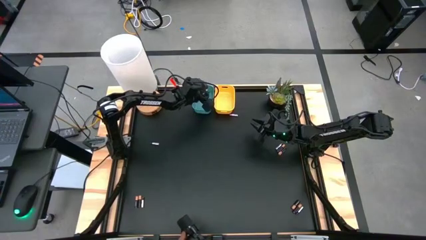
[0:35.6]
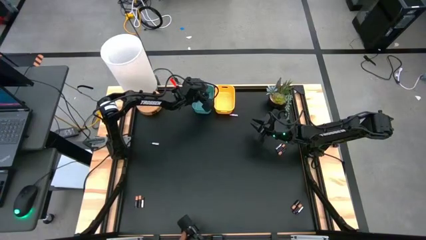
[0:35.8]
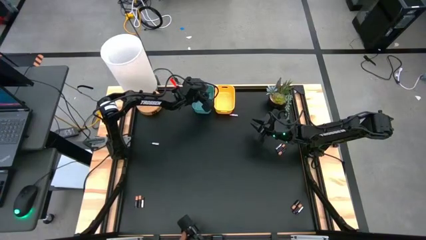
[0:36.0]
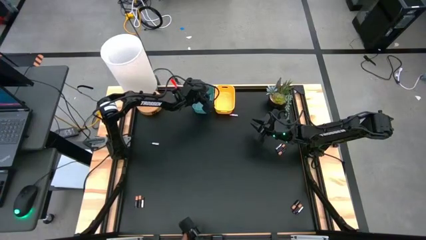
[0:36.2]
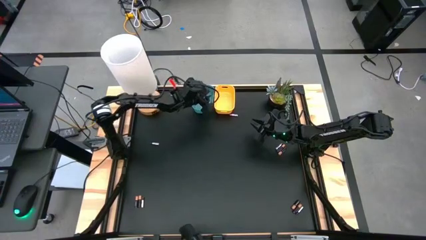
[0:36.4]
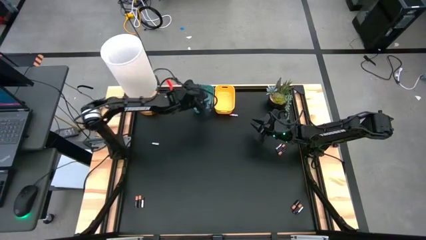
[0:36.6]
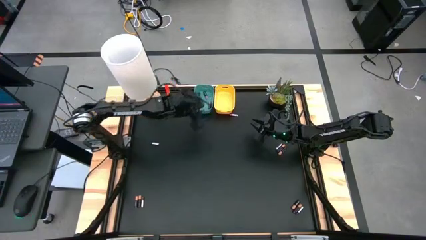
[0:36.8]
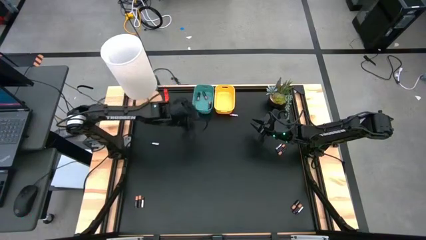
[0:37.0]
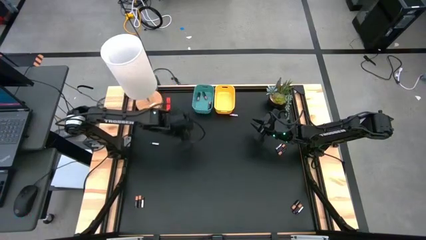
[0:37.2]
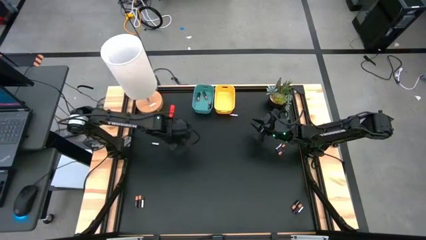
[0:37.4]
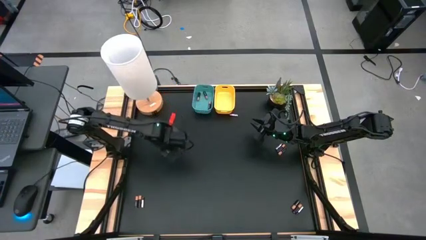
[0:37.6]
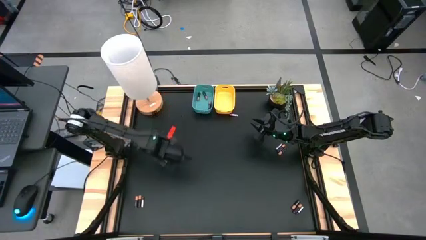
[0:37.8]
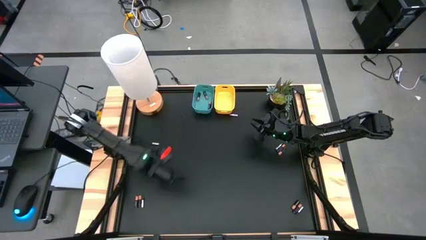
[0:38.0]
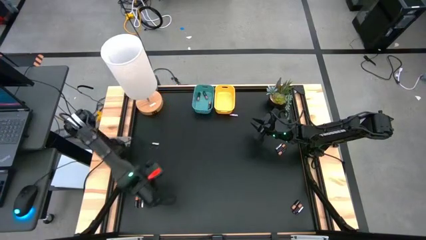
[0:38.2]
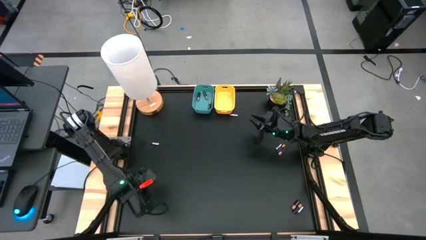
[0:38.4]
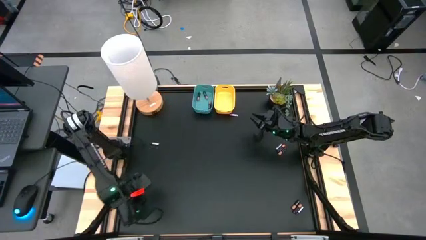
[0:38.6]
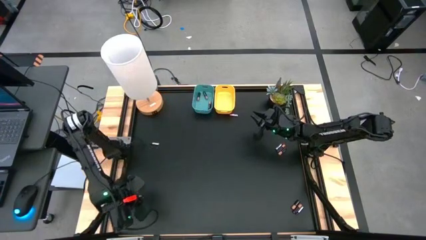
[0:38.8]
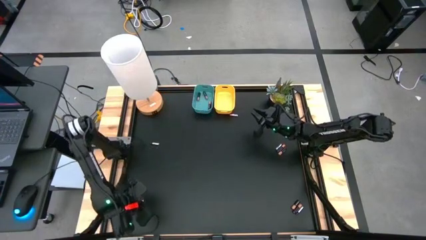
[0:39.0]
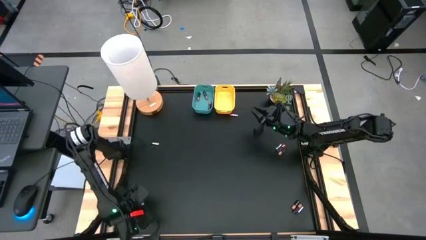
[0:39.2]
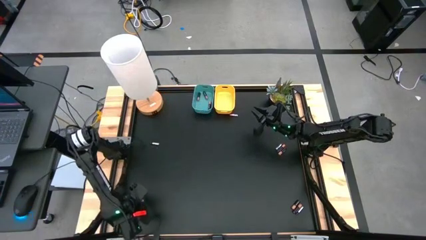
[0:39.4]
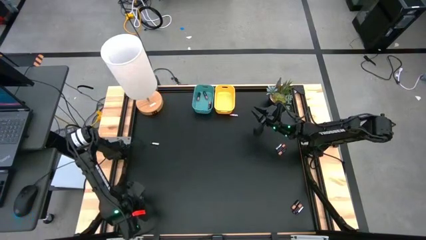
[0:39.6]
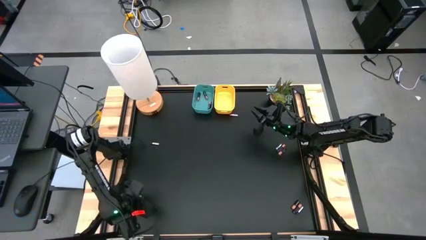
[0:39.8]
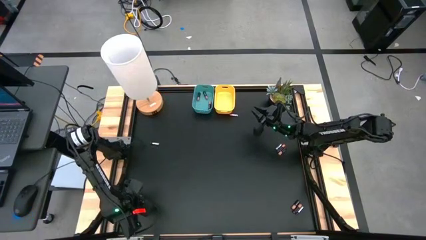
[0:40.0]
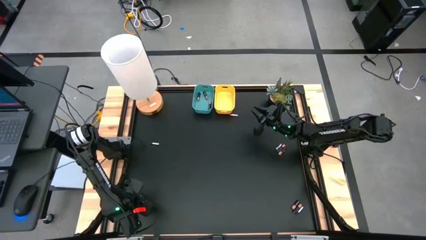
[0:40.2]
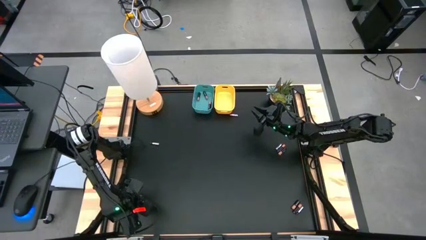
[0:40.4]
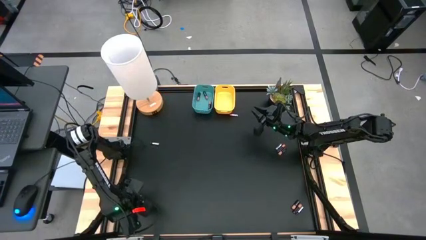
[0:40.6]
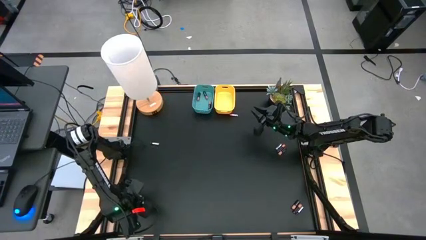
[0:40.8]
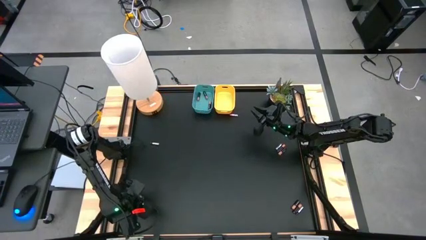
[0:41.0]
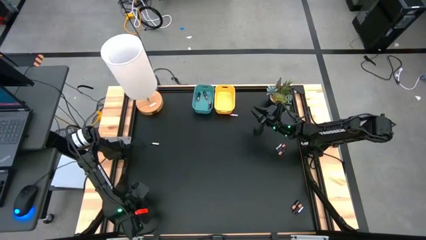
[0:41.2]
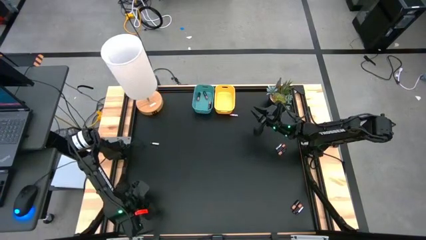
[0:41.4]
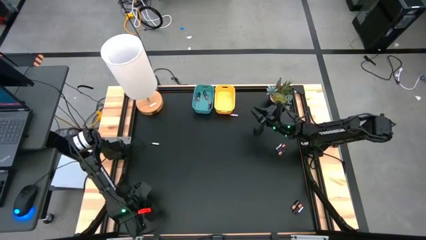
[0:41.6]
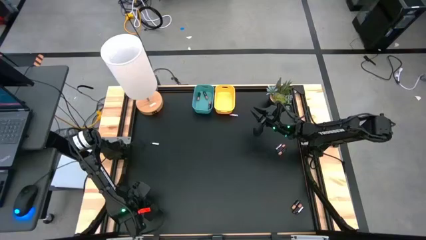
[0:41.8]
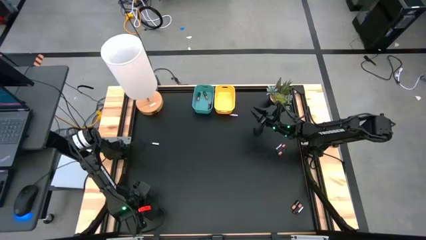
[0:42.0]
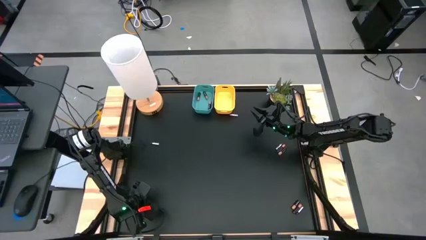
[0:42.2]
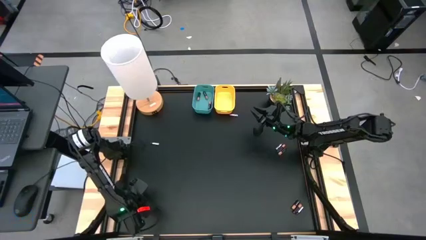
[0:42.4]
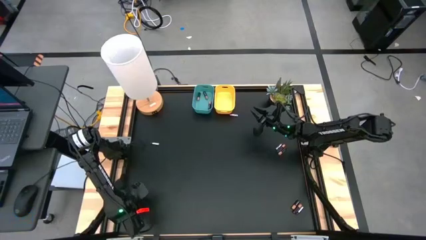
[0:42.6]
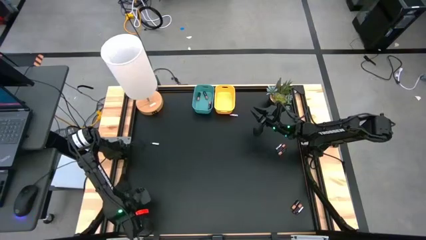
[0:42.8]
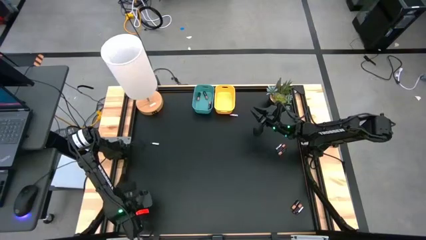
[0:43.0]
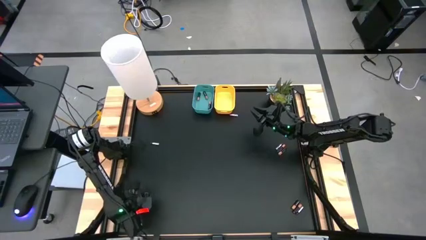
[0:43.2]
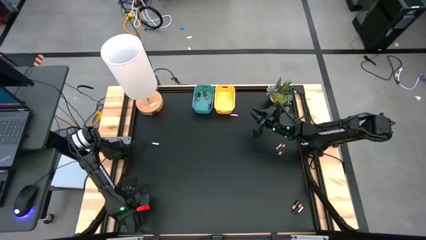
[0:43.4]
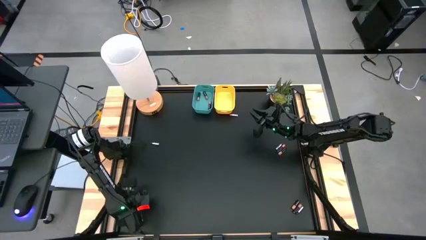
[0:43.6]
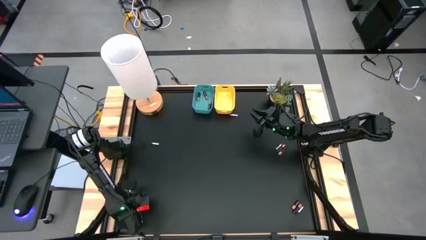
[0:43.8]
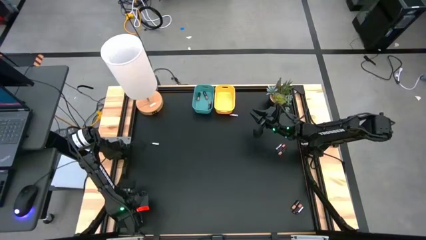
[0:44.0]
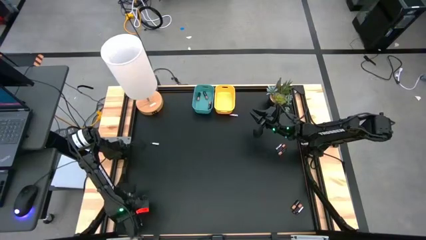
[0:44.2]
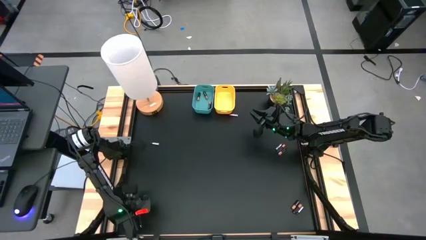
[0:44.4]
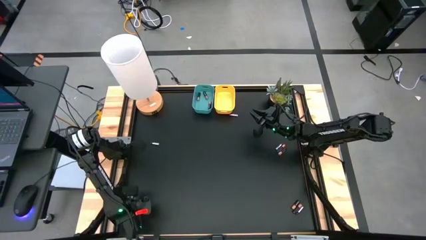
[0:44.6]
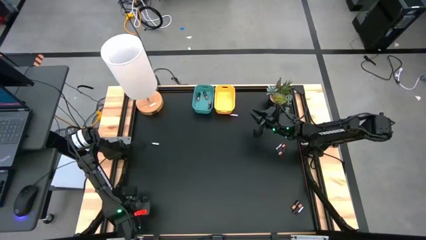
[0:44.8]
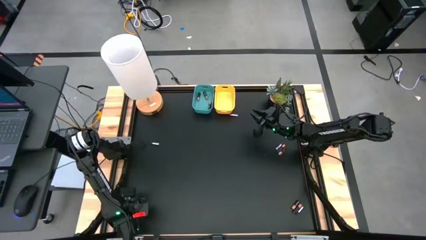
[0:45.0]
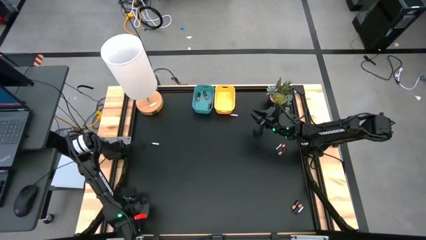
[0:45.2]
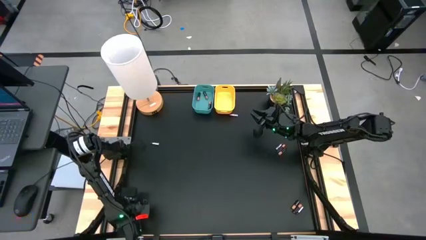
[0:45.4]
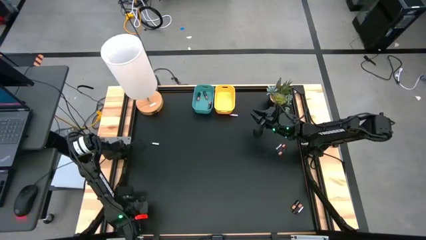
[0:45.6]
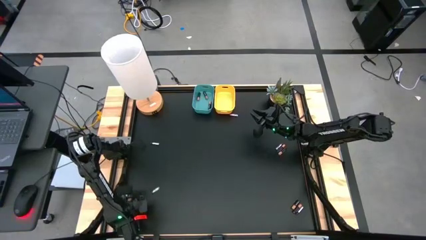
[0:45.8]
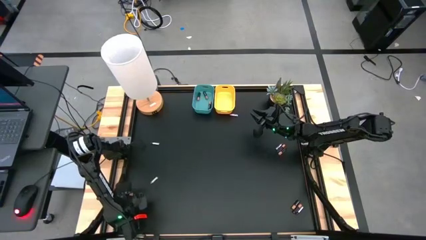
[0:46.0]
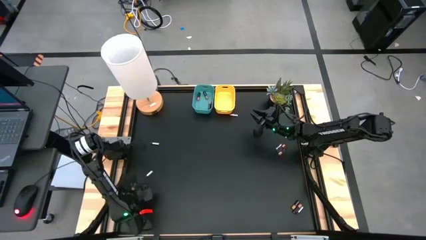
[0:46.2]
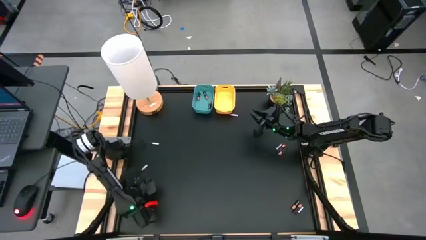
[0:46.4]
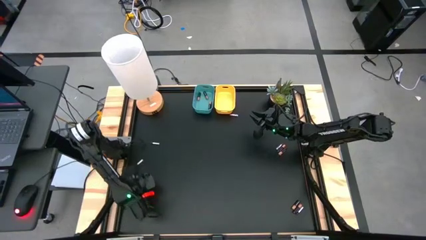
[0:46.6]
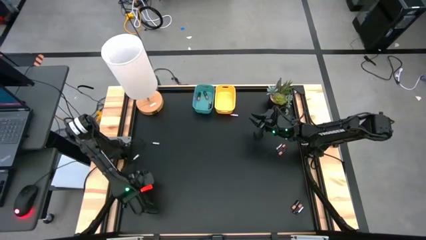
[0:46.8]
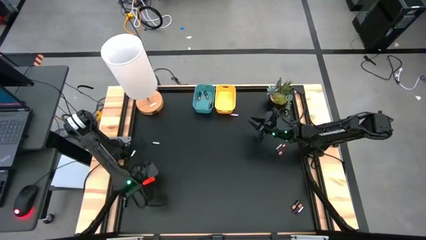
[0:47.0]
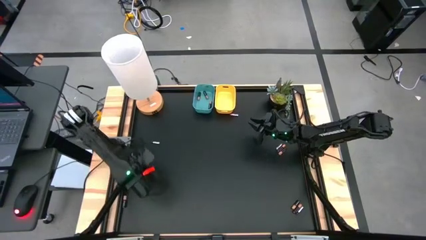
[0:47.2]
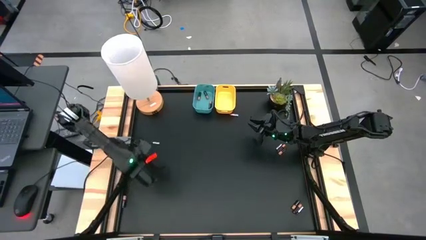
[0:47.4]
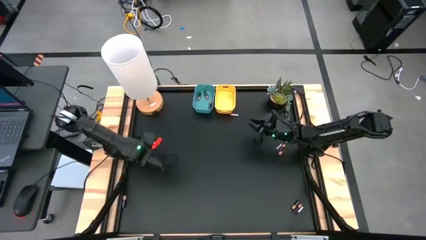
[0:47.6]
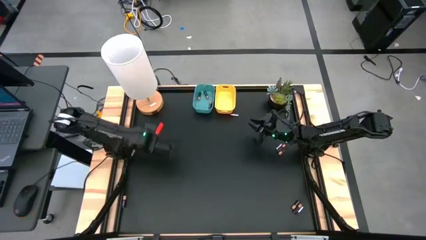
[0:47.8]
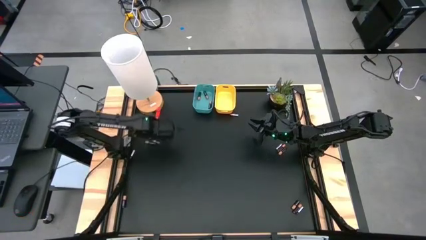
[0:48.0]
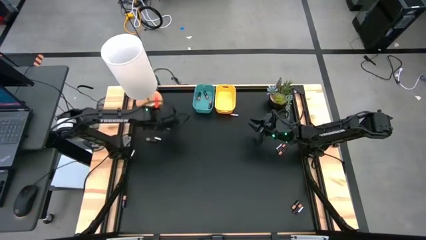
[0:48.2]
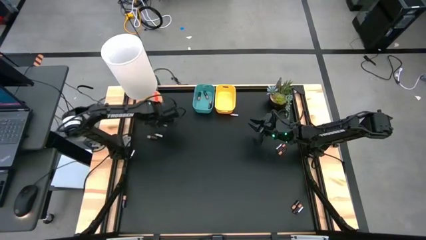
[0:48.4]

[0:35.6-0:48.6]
Task: Sort batteries
Put the gold black battery into the blue bin
